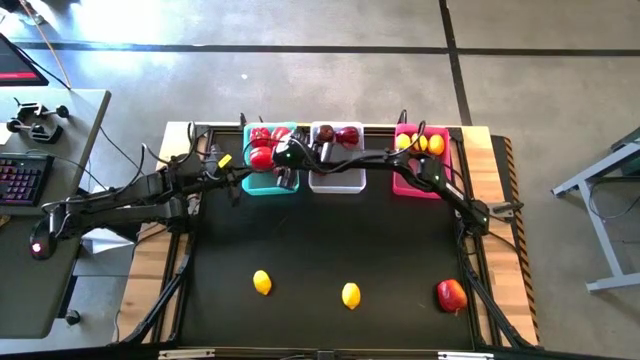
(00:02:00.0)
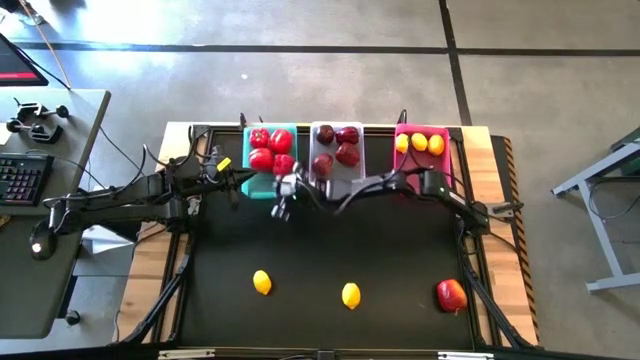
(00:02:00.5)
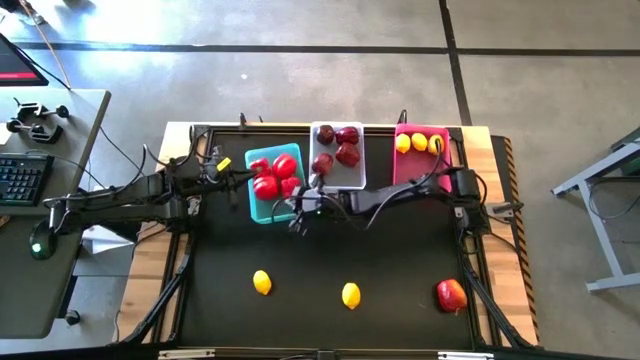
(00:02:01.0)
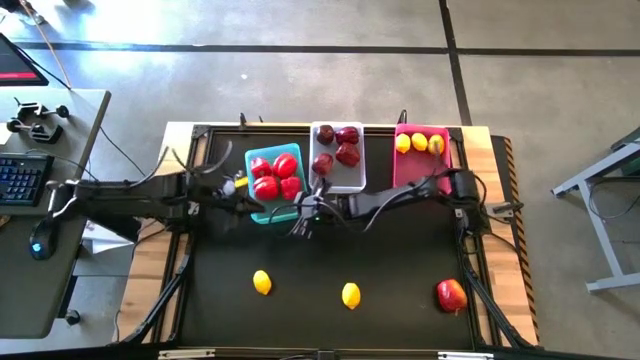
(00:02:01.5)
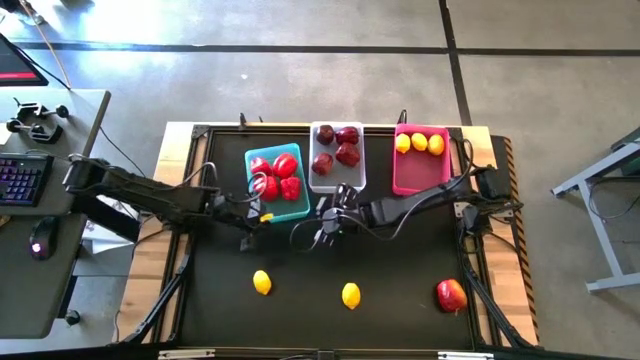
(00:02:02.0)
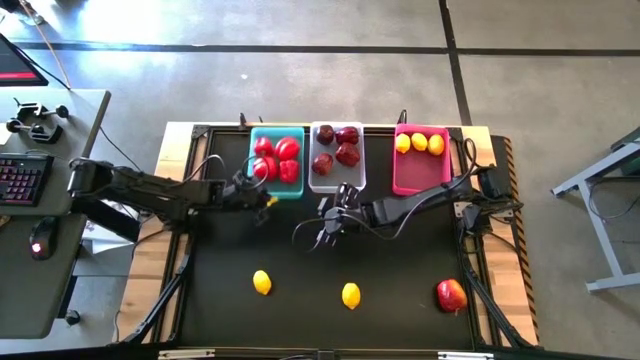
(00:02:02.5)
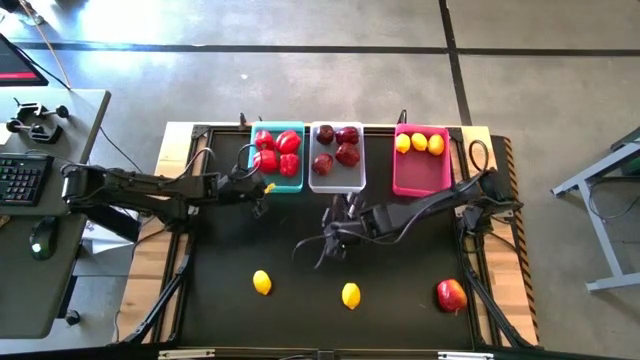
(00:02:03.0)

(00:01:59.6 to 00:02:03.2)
Task: Sort produce into baskets
Adjust the green bin

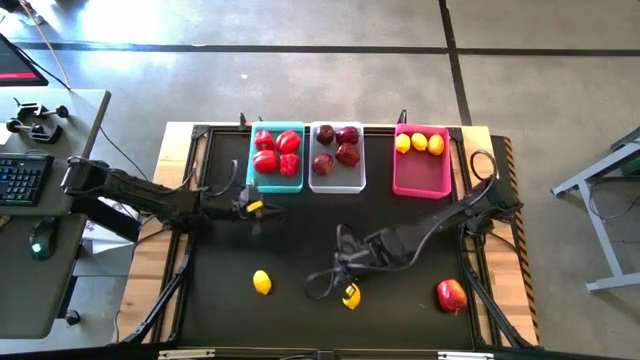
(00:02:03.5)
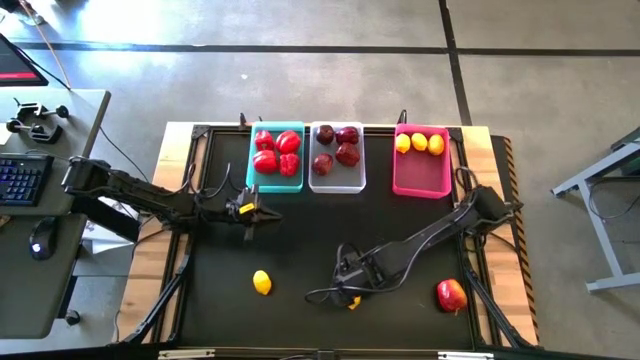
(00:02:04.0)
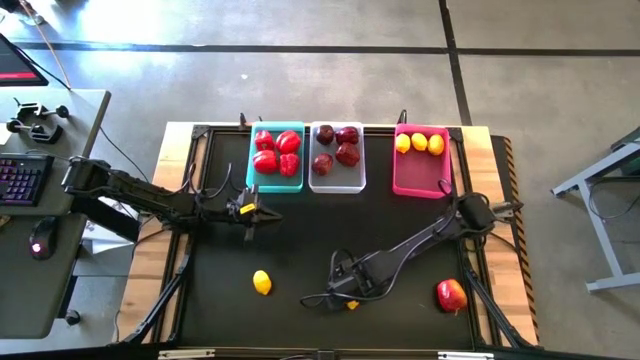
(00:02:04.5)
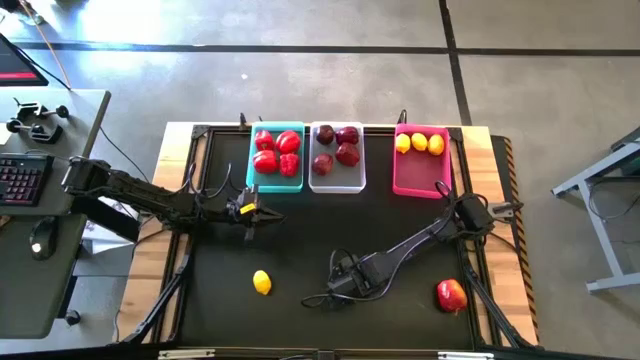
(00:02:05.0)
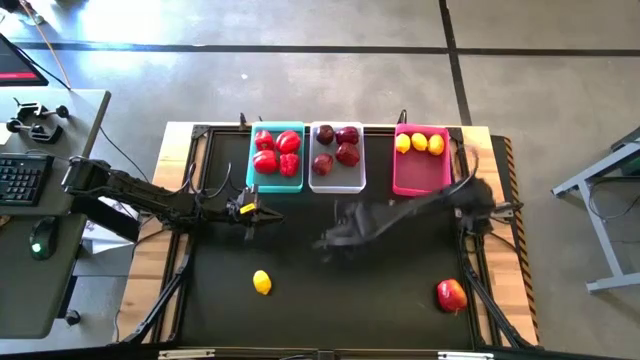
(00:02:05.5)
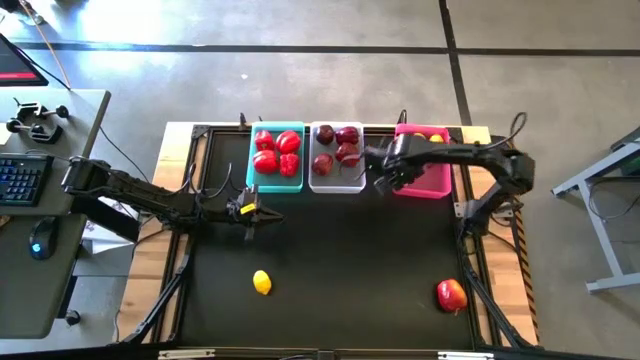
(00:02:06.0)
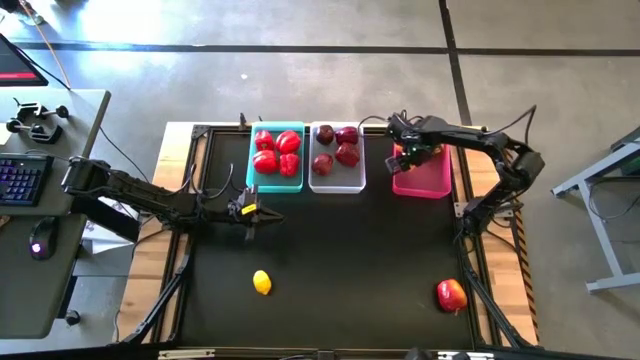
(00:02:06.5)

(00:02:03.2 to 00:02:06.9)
Put the lemon into the pink bin

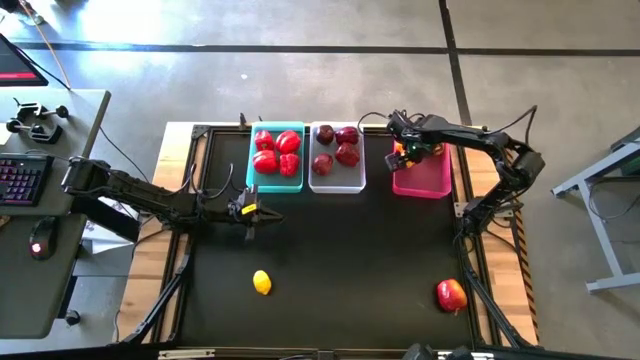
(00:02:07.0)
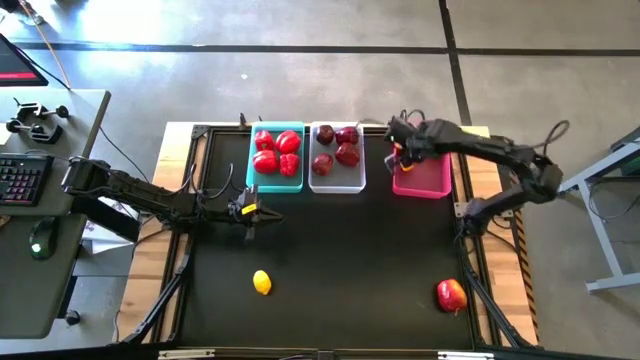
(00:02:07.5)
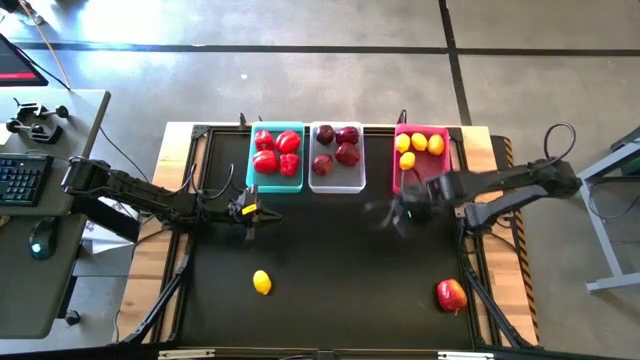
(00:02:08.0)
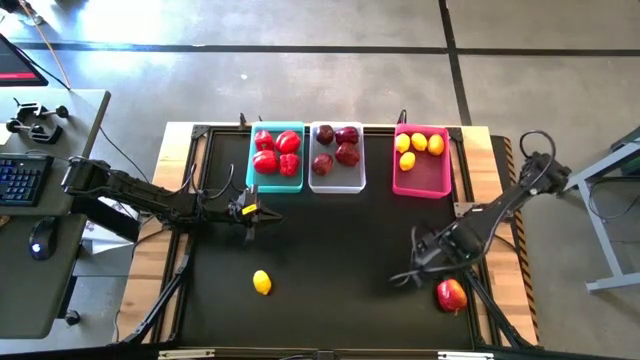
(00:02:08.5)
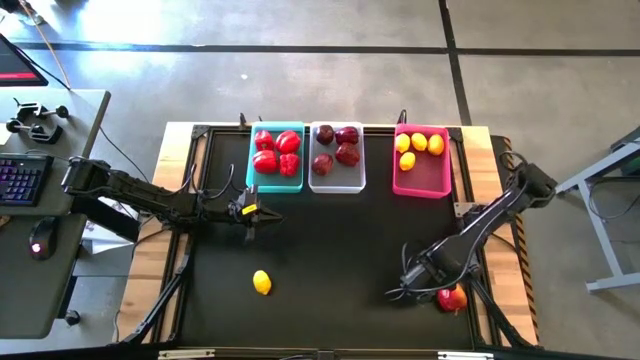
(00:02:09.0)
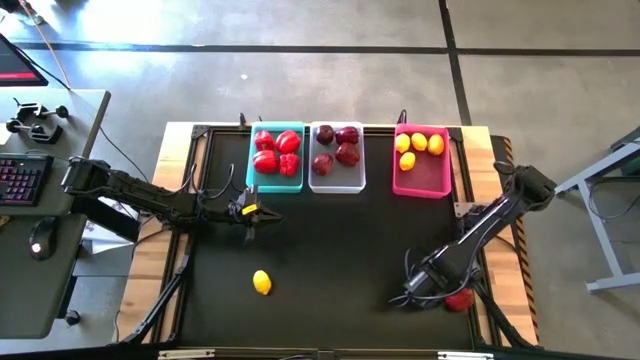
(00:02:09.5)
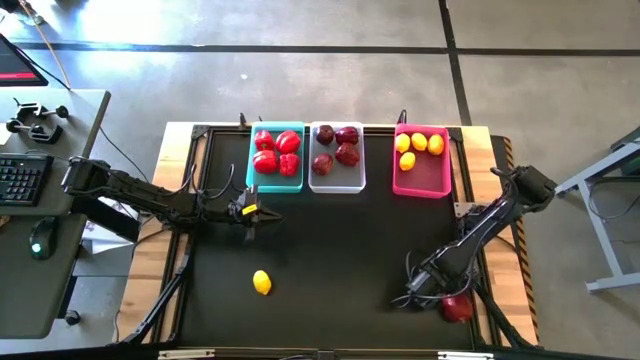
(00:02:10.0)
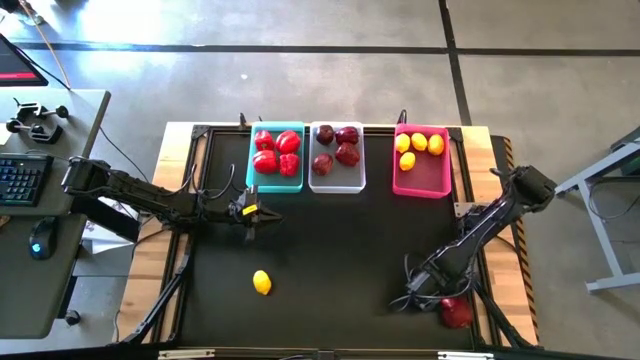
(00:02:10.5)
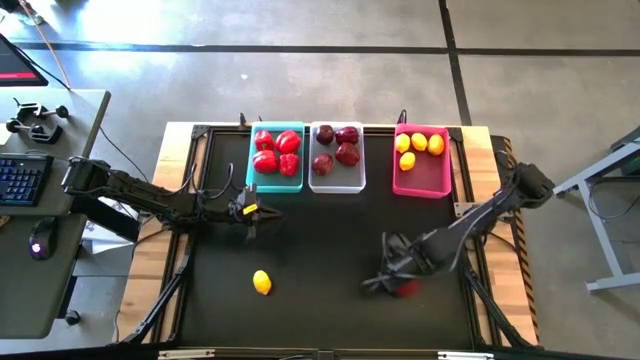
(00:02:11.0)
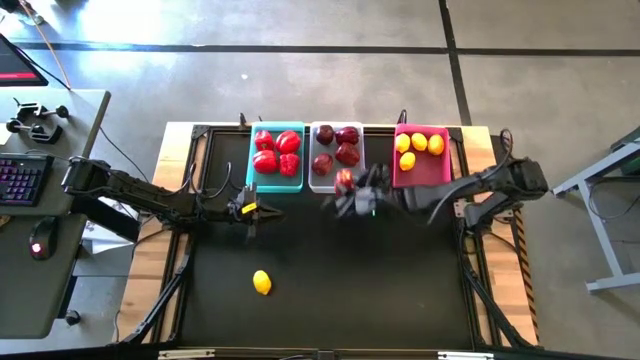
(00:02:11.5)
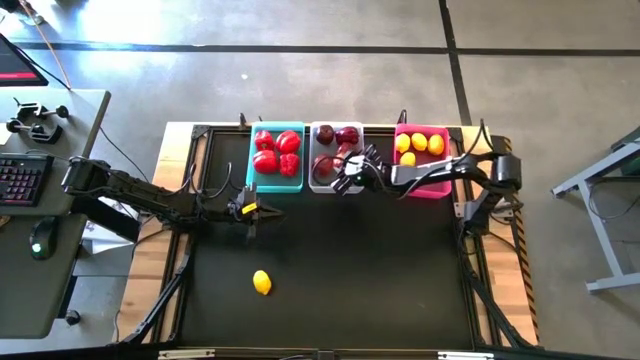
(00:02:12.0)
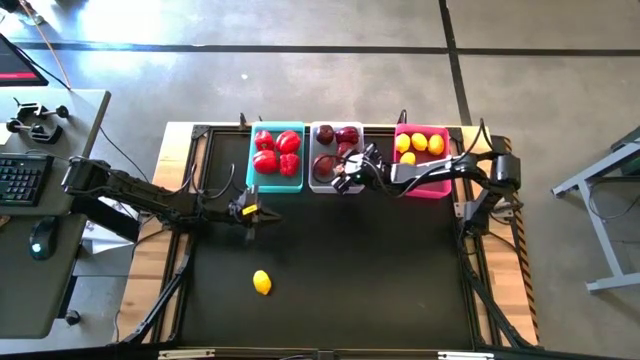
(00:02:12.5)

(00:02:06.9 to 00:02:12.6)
Put the apple into the white bin

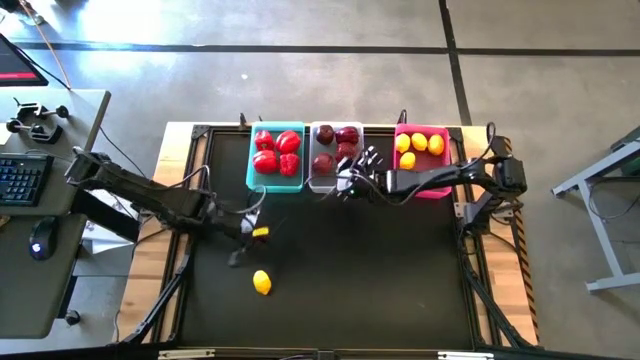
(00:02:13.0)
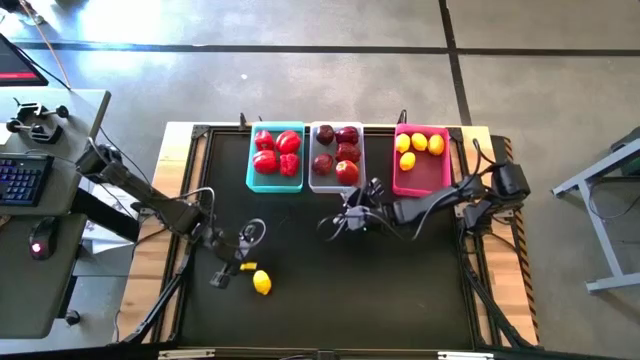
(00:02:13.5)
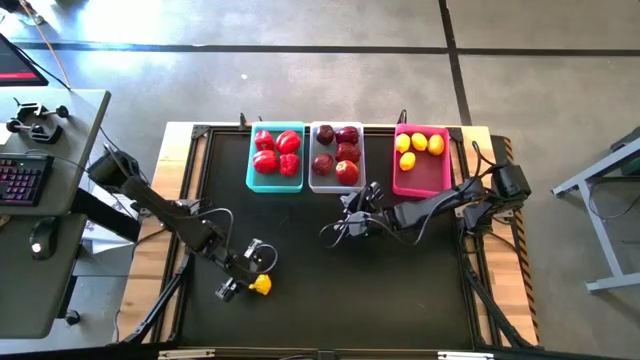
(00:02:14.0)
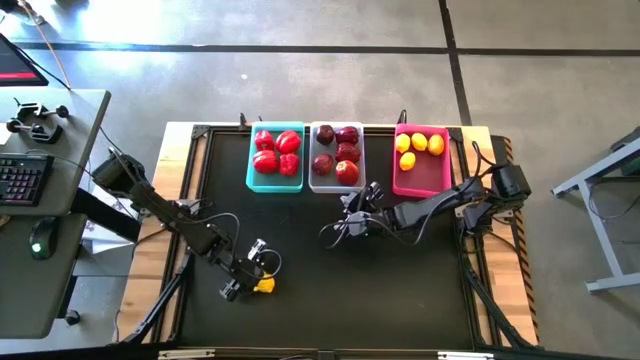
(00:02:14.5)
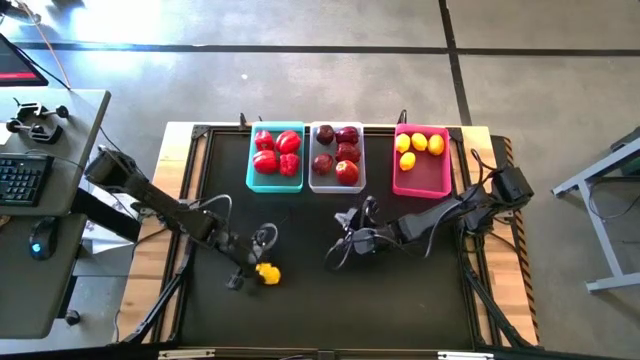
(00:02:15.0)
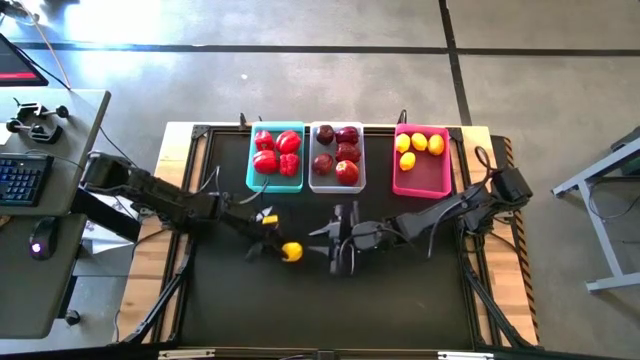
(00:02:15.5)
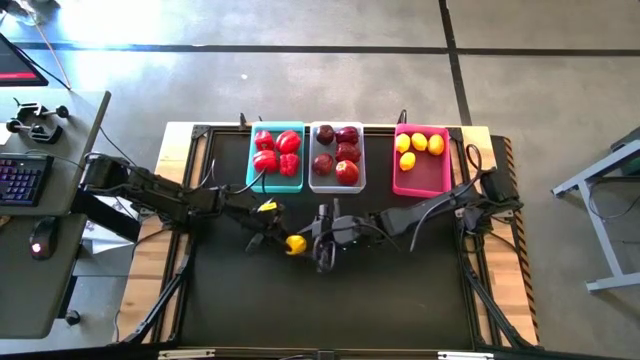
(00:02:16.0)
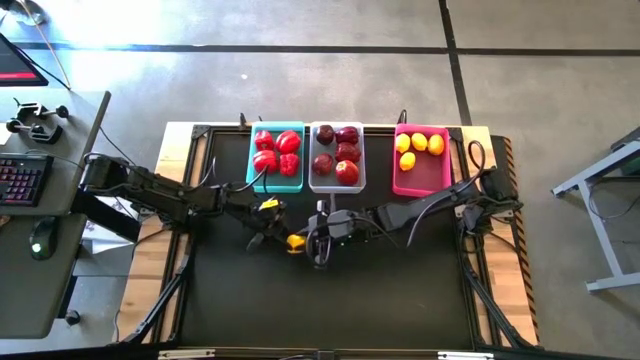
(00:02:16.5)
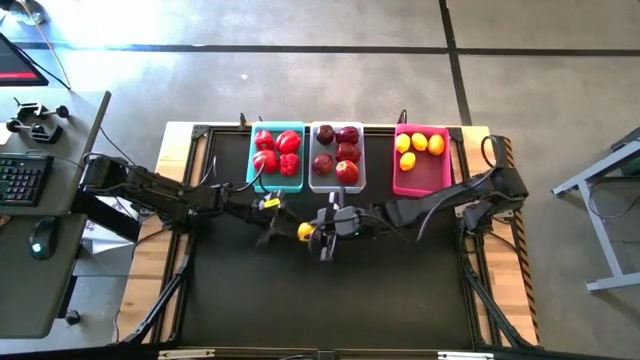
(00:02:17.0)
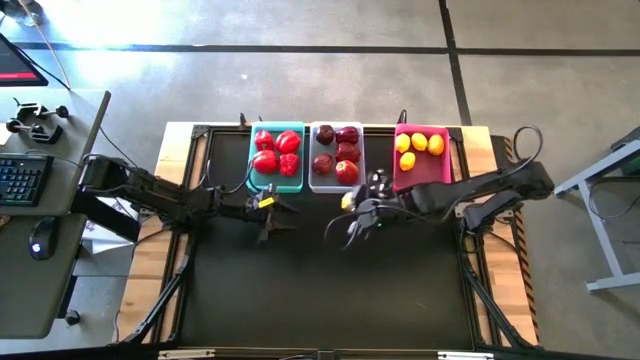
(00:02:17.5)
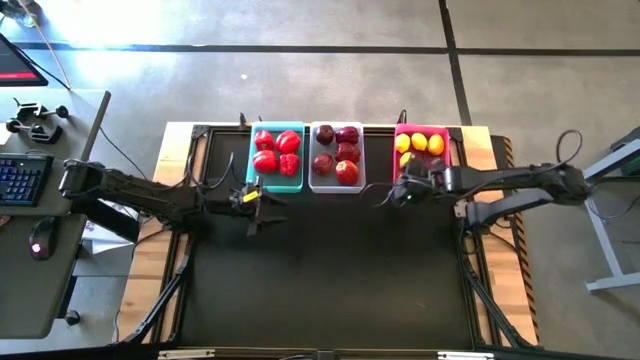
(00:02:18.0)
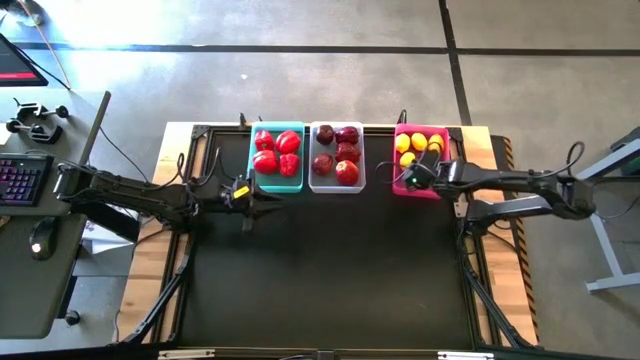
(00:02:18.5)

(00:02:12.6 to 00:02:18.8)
Put the lemon into the pink bin

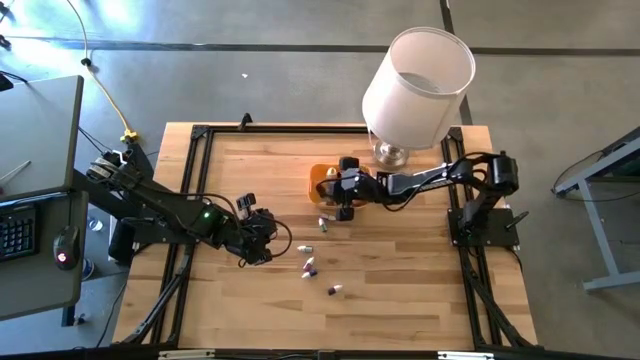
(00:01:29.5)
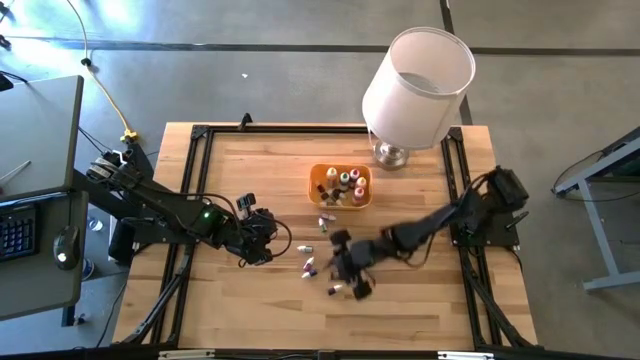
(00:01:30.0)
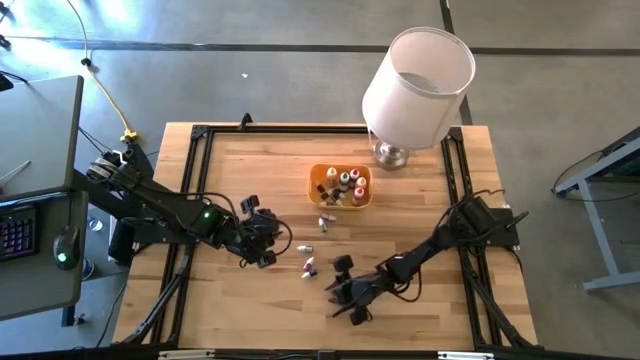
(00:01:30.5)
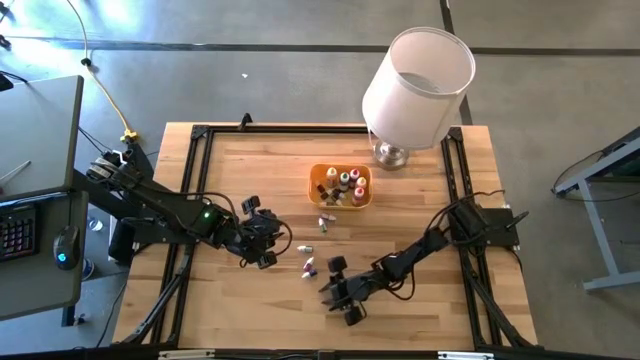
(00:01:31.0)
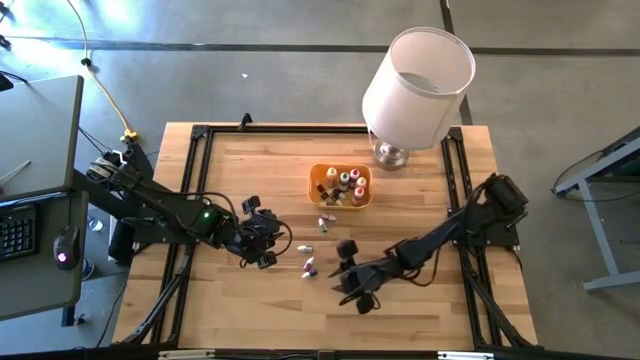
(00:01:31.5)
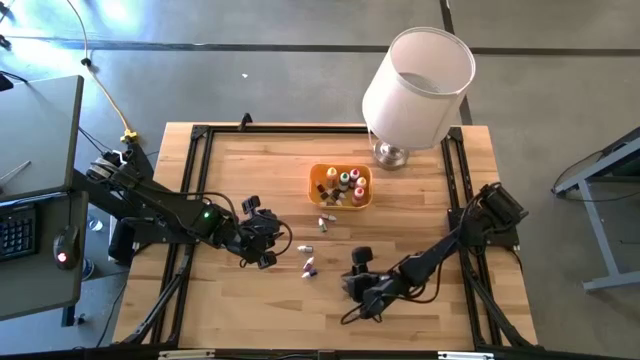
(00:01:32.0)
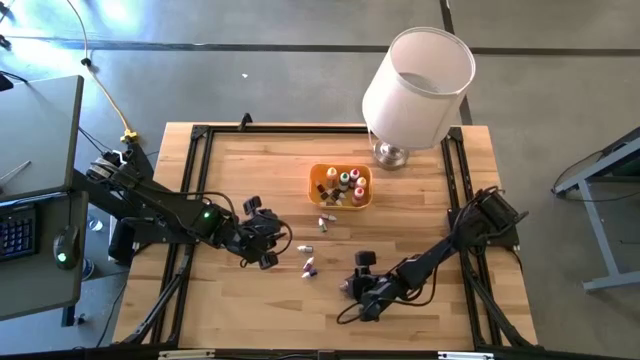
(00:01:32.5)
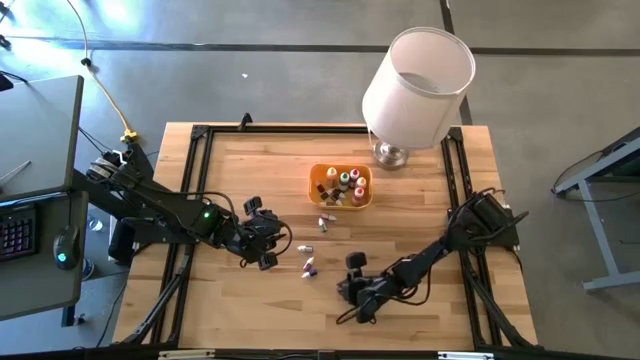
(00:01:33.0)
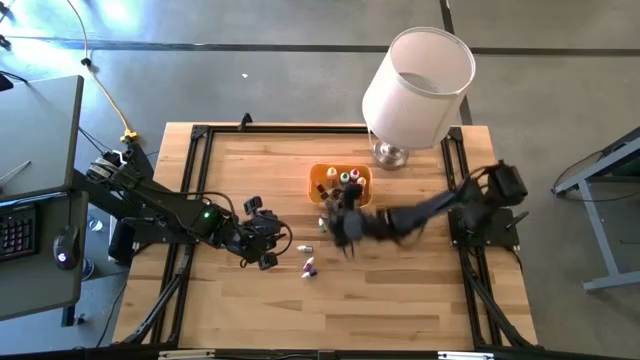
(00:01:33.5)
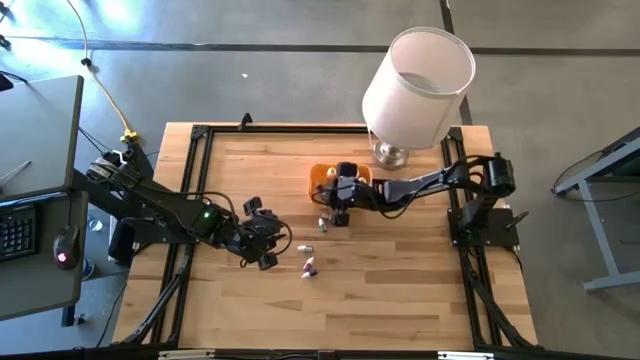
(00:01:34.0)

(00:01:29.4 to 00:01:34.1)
Task: Pick & Place food coloring
Put the small red food coloring bottle into the yellow container
